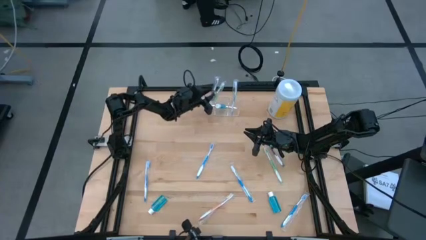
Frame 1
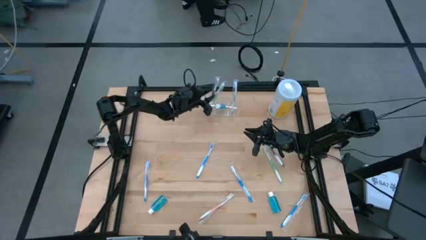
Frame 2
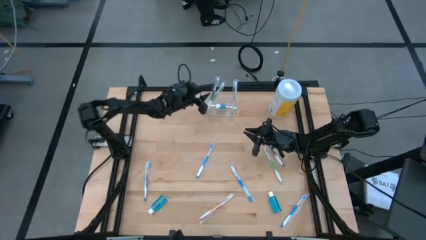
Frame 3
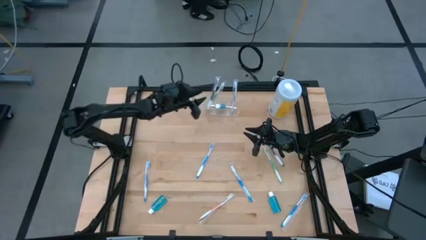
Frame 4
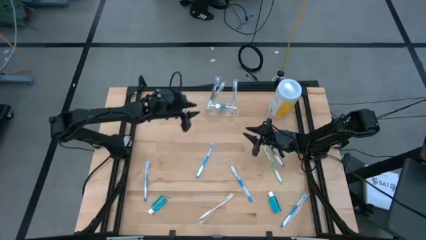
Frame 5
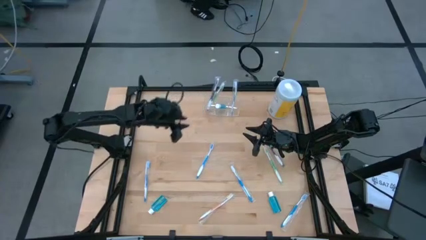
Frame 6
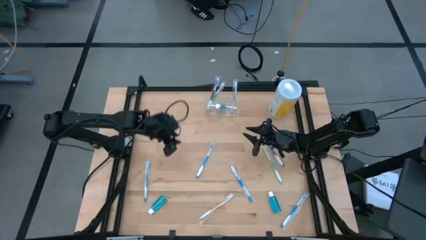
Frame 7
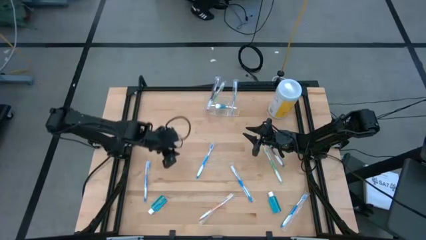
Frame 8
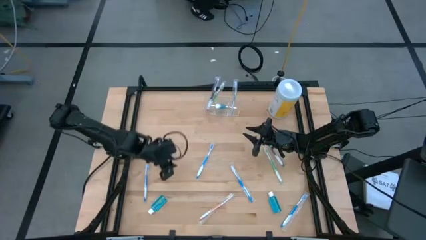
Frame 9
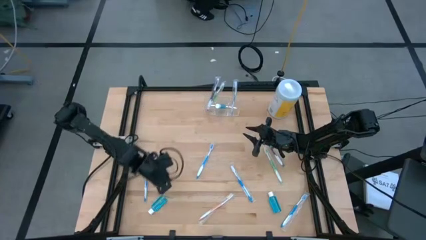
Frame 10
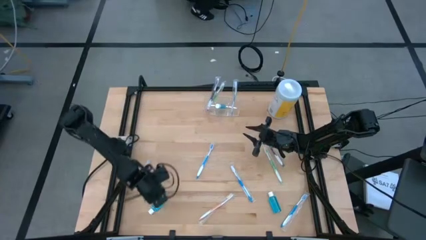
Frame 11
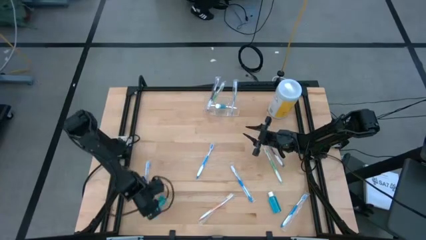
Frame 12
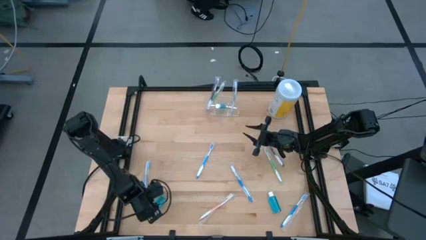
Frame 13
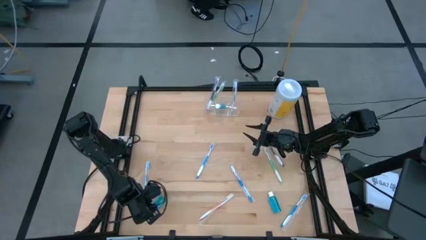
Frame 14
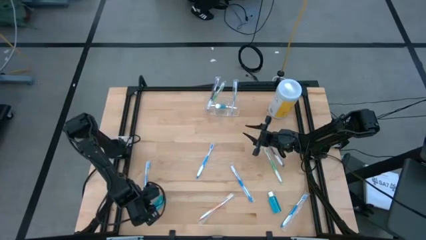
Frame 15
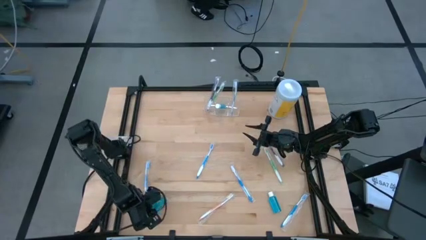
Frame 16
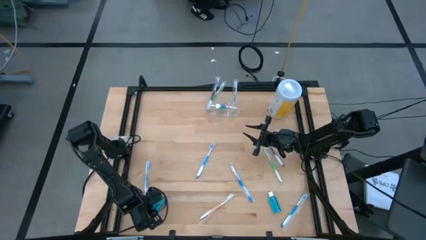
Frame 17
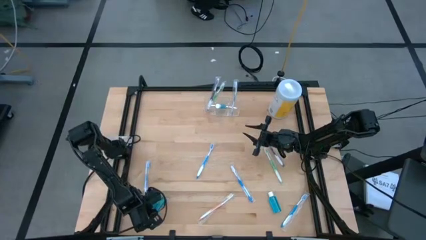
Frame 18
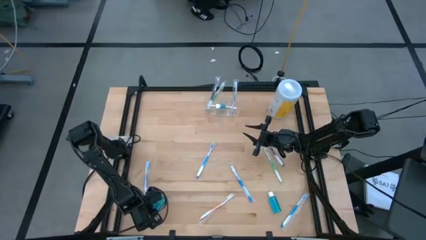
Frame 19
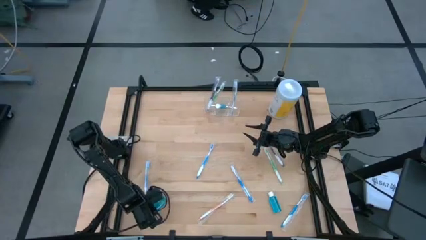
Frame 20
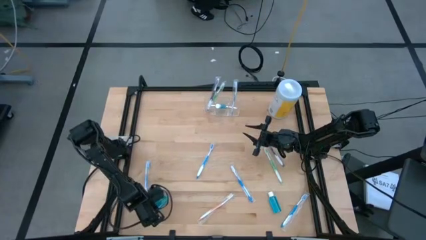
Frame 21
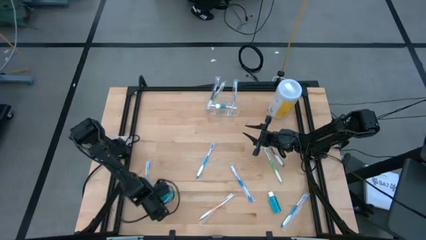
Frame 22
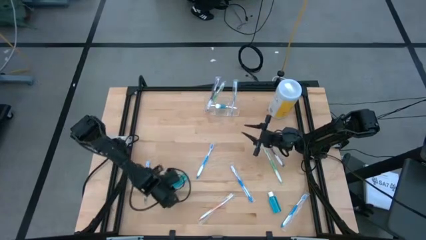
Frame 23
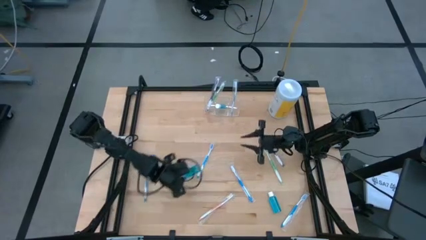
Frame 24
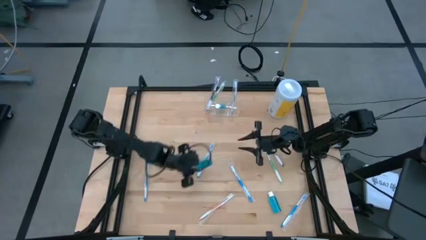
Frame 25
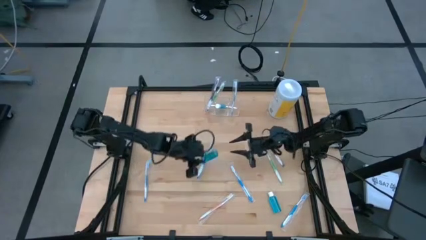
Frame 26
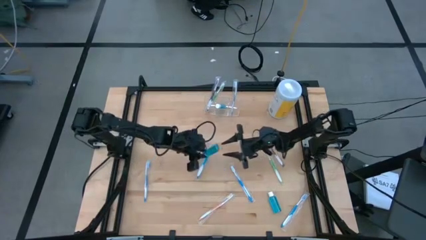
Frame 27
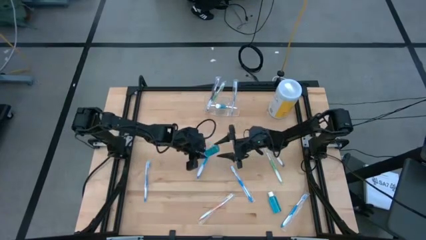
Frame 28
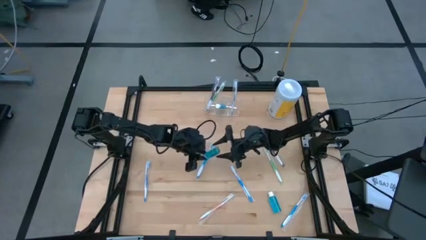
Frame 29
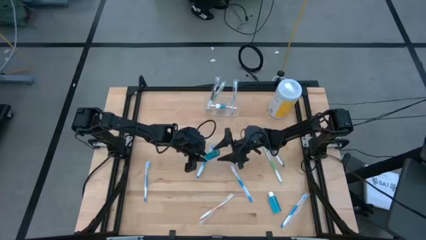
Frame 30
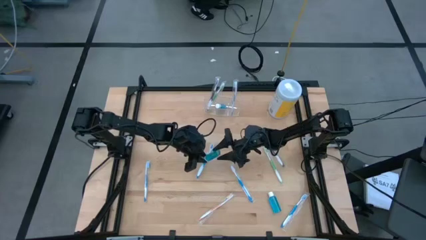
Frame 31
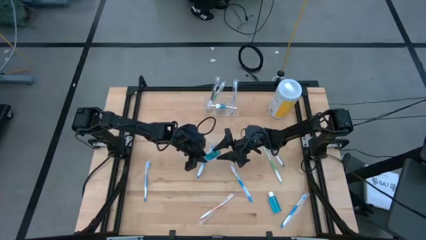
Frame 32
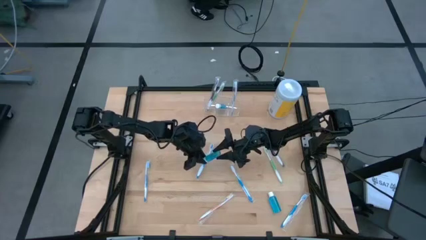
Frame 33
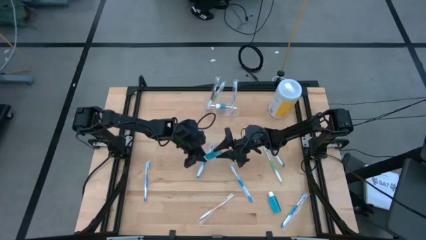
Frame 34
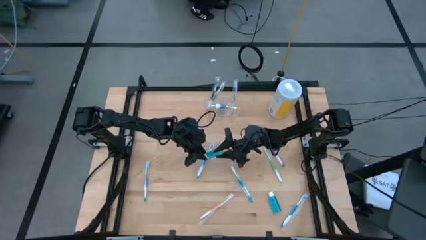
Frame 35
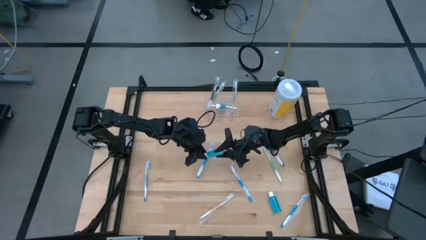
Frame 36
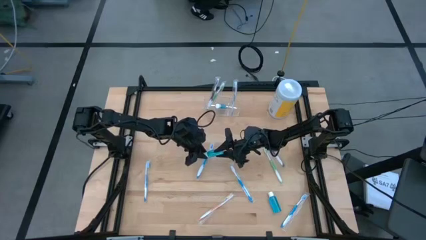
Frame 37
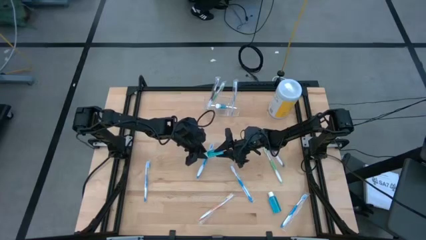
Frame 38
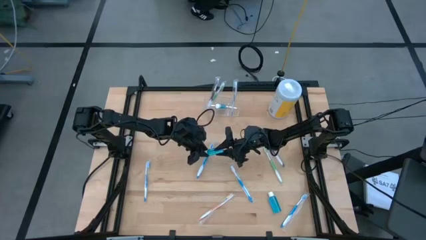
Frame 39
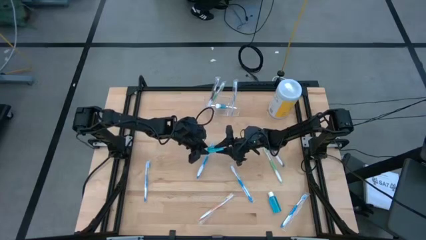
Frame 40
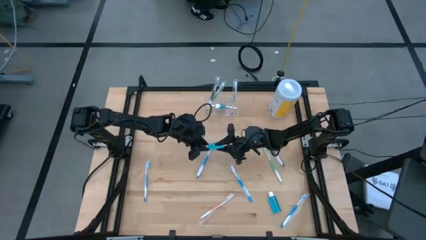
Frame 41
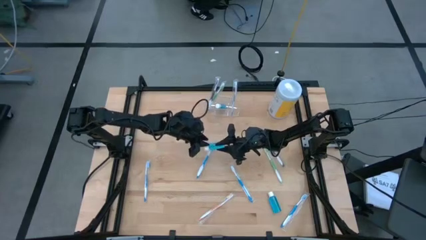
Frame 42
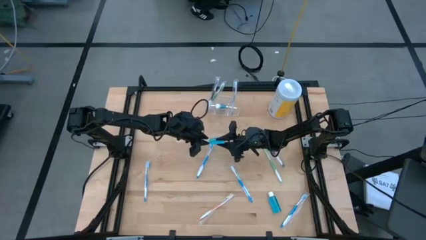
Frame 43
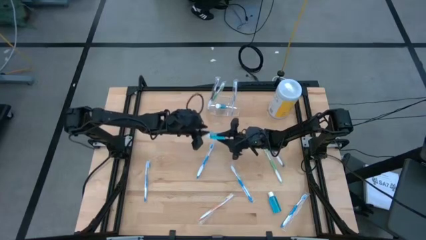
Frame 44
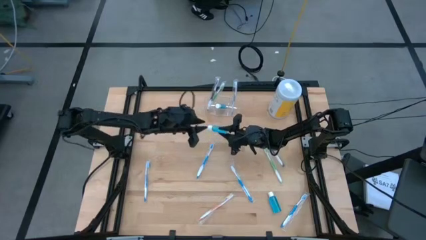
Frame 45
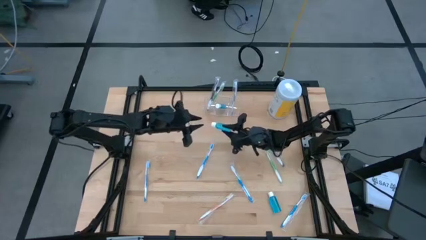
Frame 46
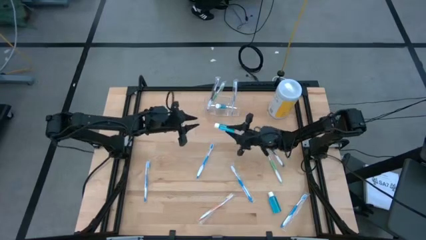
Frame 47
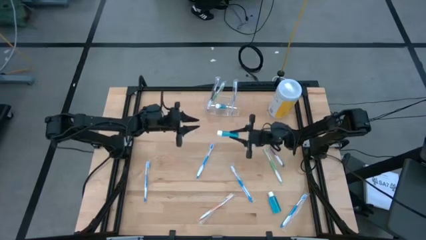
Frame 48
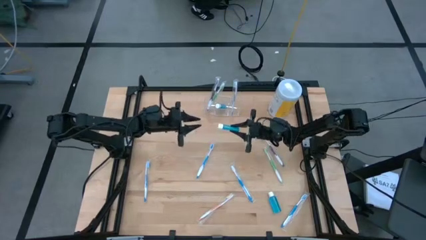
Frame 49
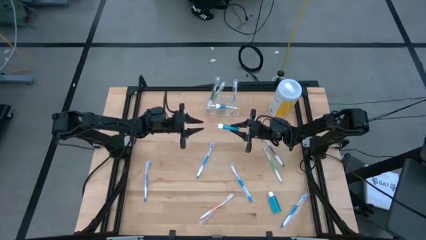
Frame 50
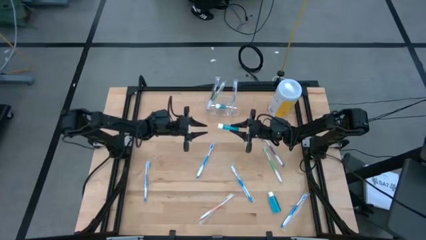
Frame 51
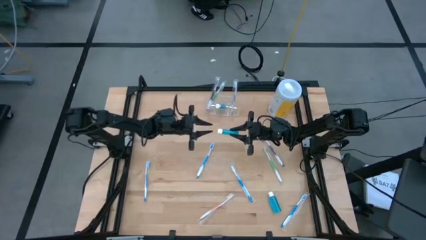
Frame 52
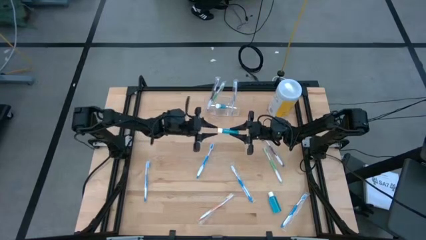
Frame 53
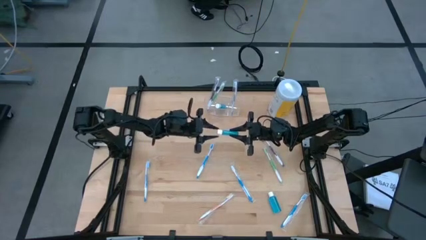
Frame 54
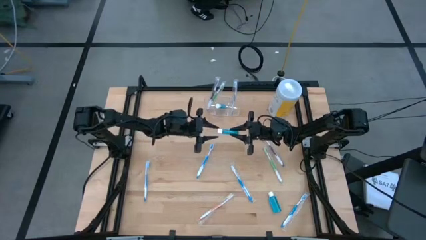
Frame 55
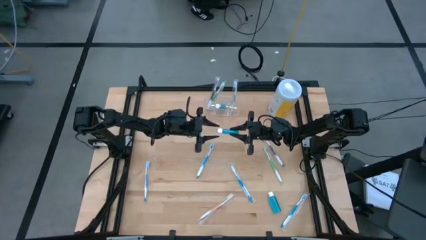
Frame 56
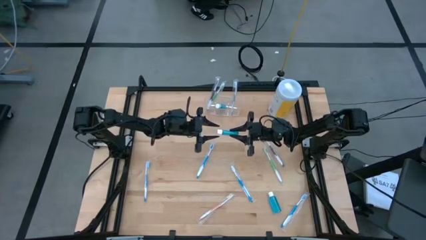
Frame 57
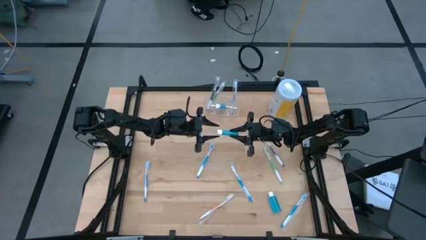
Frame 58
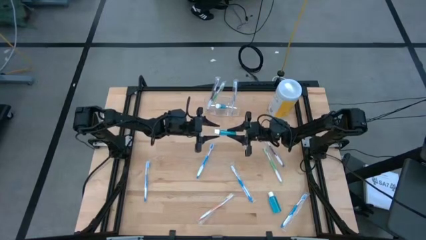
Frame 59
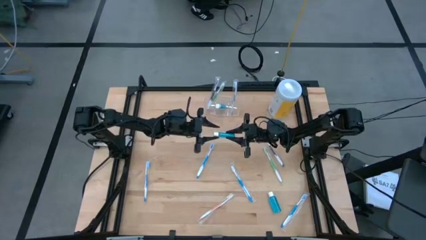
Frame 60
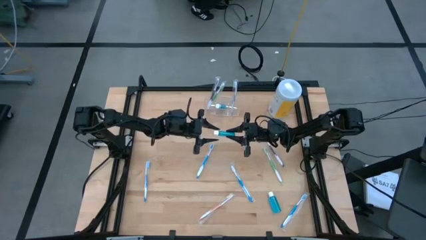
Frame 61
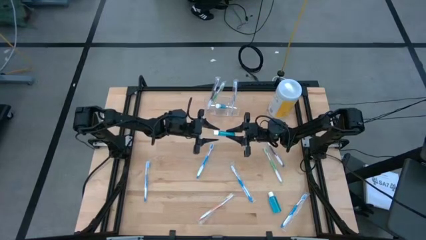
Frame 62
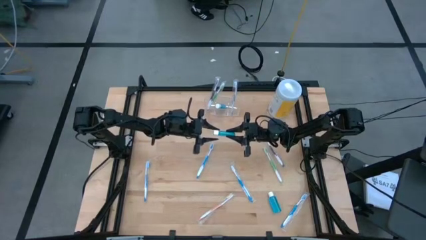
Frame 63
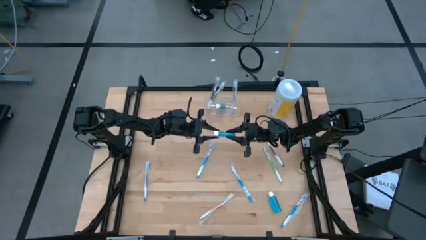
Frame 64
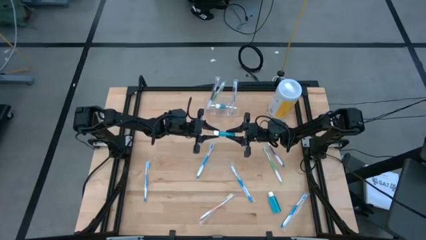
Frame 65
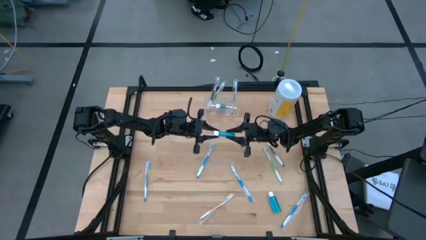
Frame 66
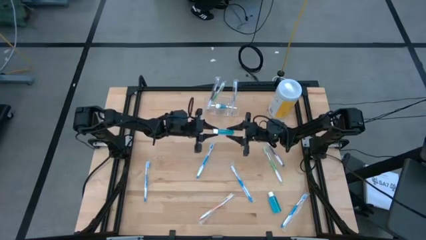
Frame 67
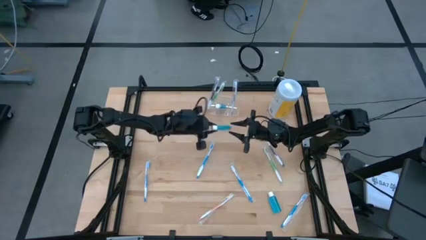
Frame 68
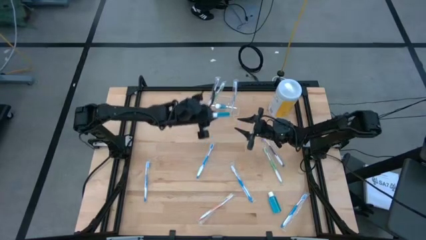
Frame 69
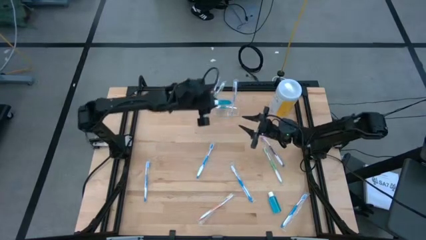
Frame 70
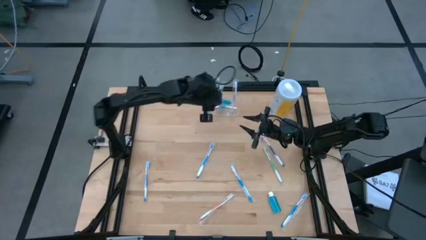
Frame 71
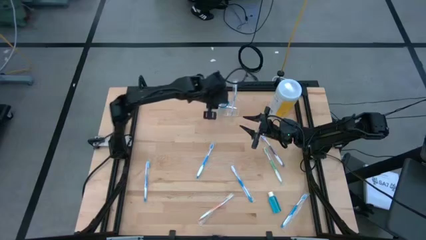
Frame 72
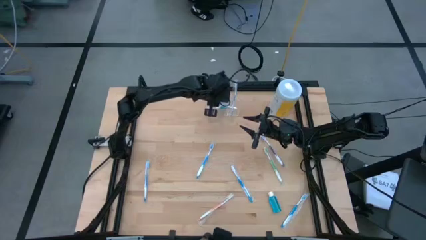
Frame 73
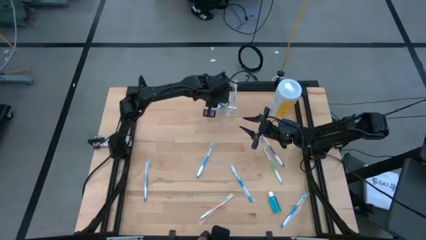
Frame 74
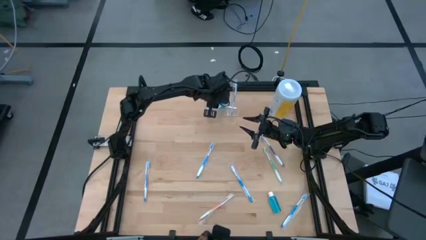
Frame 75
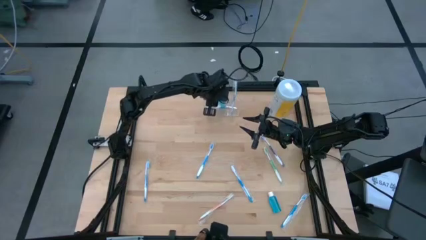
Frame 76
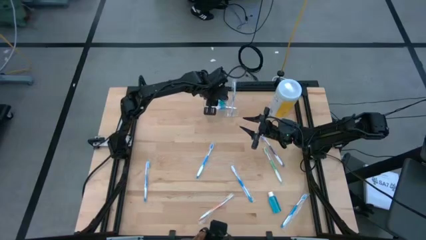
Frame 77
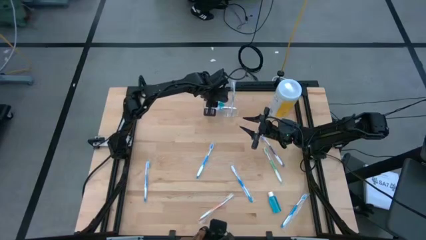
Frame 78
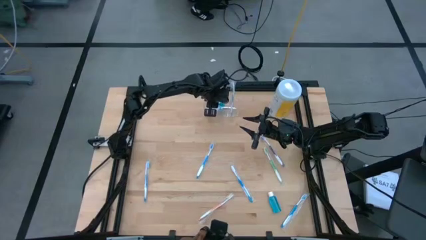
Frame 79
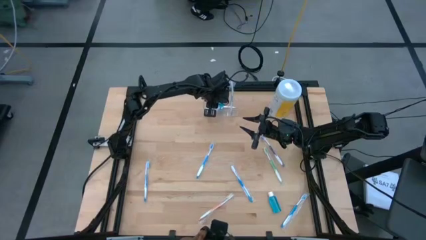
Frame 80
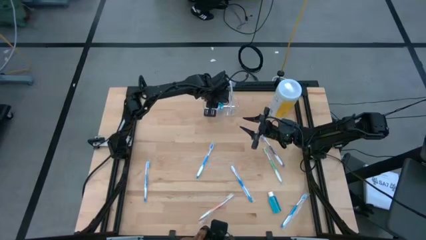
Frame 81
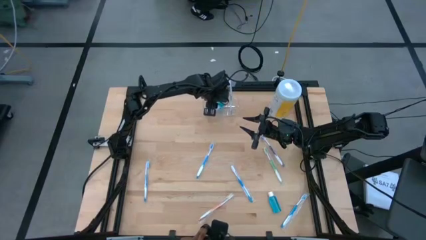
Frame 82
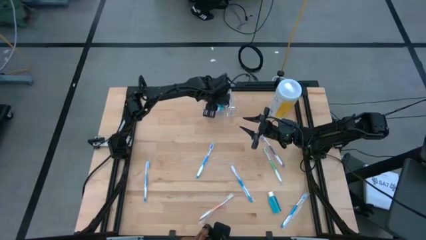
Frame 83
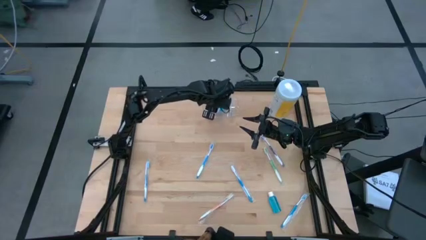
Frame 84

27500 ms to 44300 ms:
Task: Pick & Place toothbrushing station
Put the mouthwash into the transparent organizer
